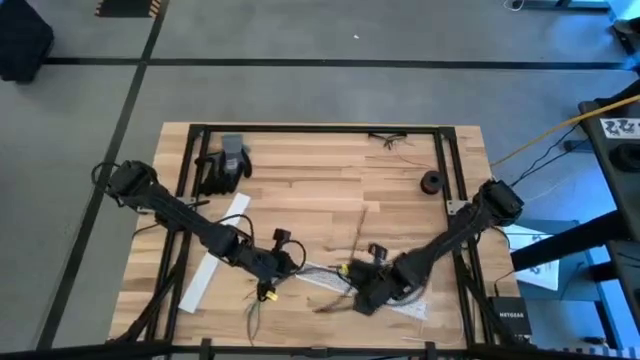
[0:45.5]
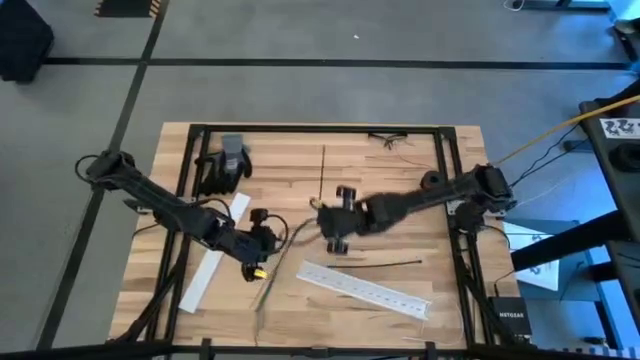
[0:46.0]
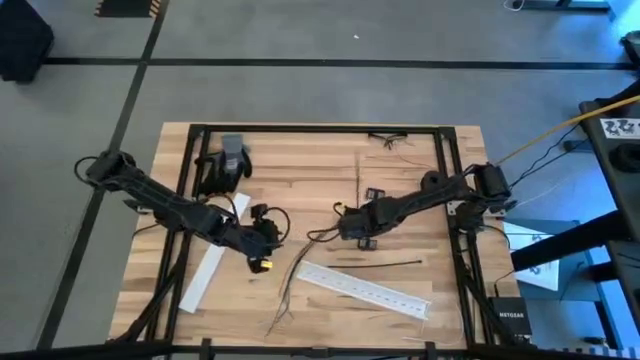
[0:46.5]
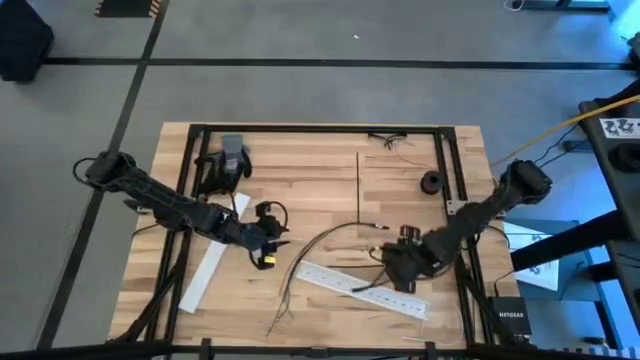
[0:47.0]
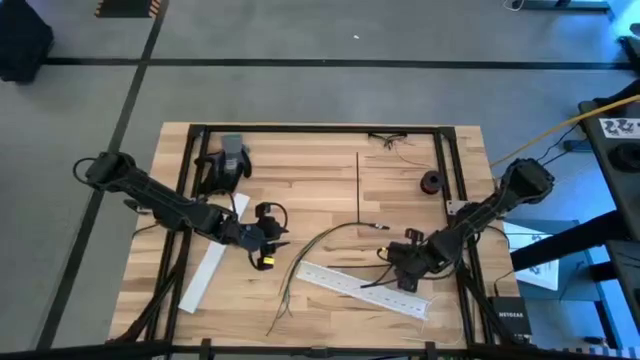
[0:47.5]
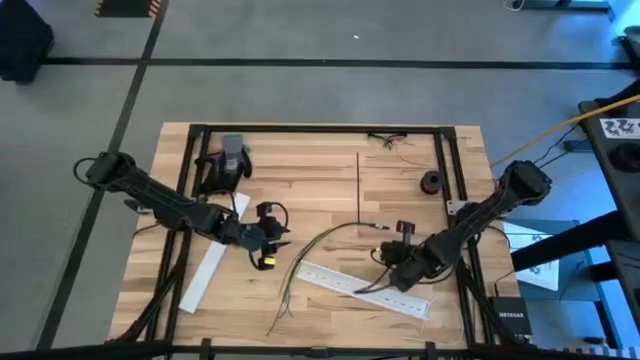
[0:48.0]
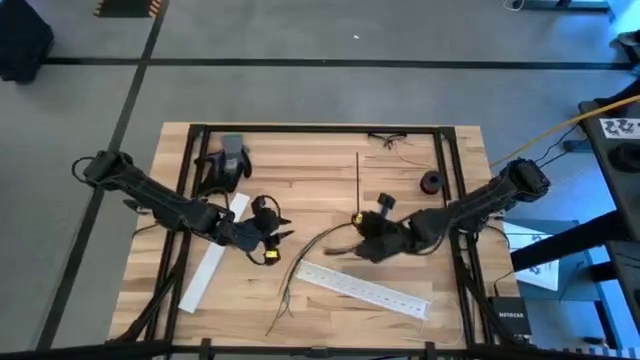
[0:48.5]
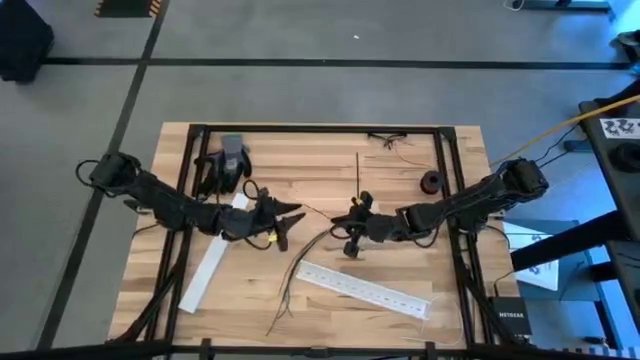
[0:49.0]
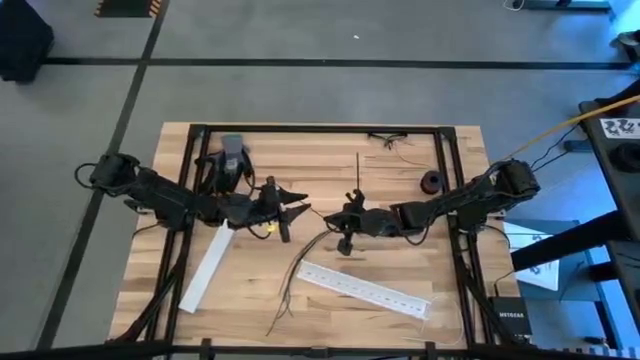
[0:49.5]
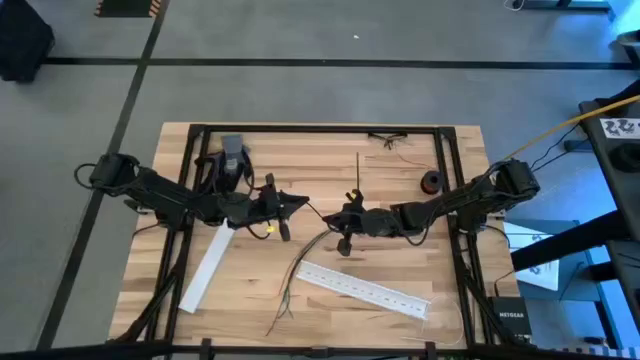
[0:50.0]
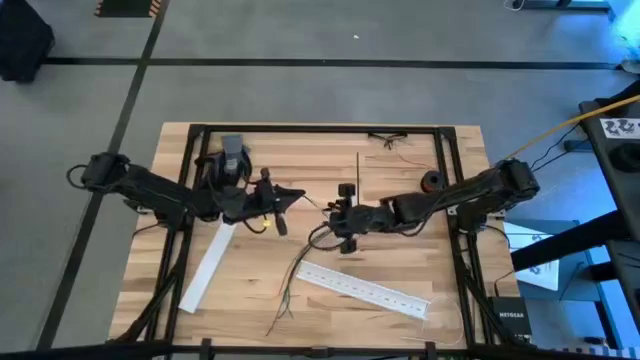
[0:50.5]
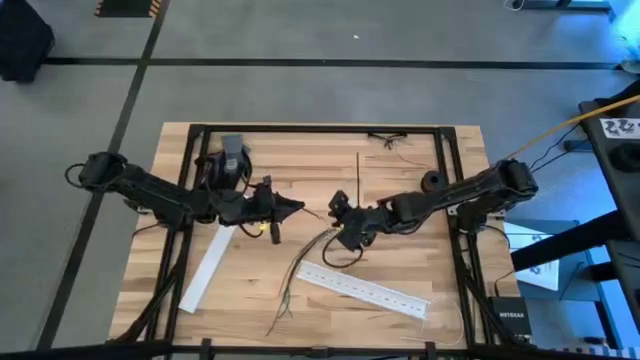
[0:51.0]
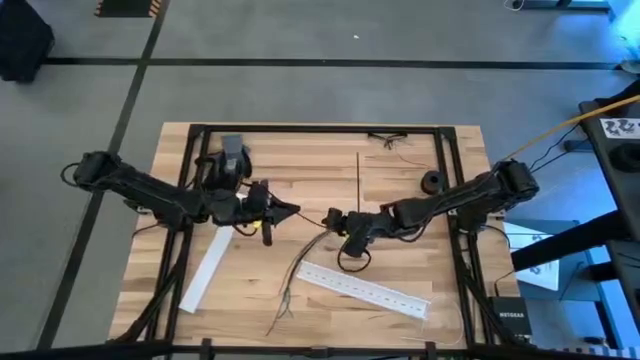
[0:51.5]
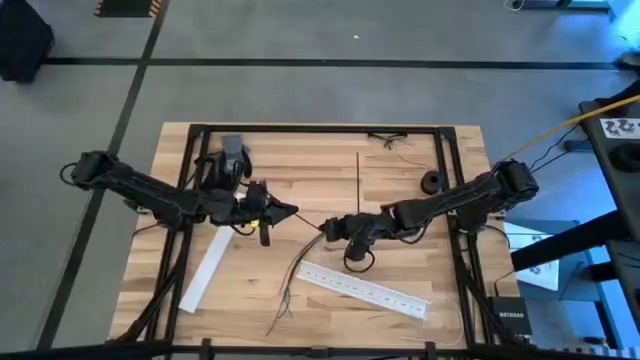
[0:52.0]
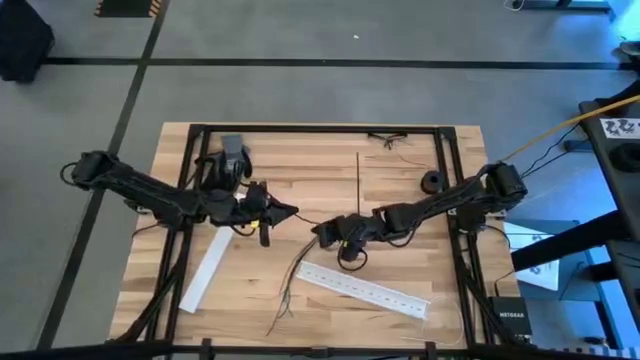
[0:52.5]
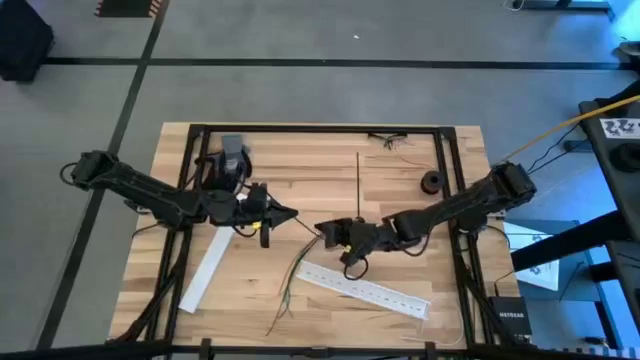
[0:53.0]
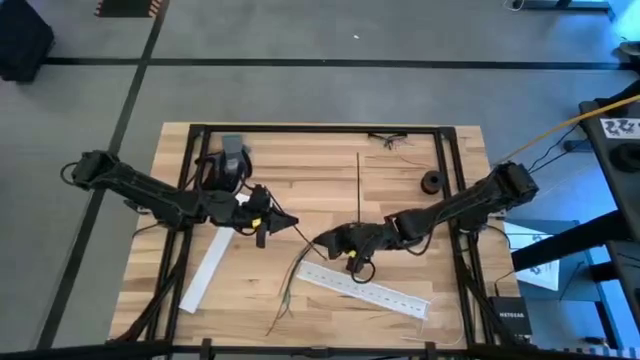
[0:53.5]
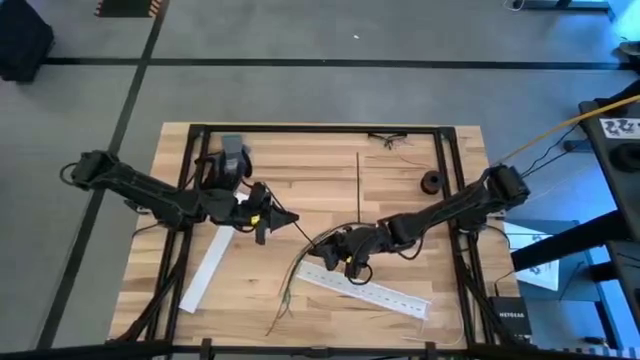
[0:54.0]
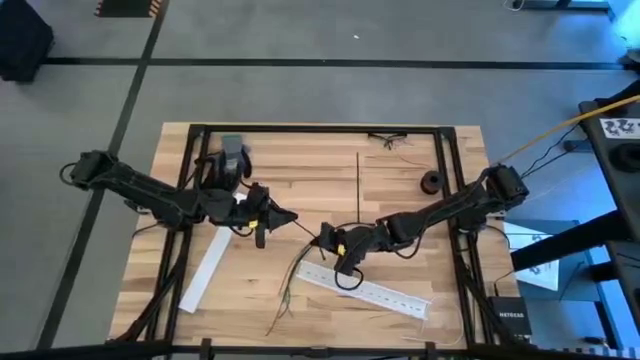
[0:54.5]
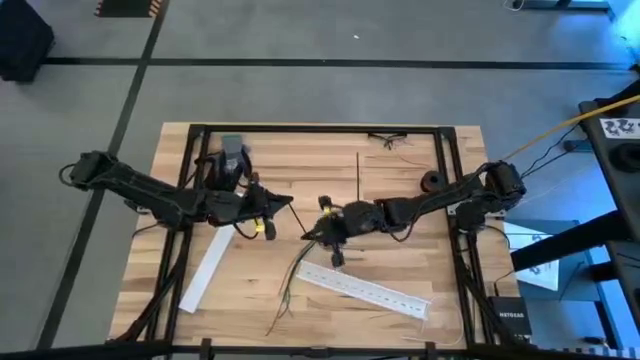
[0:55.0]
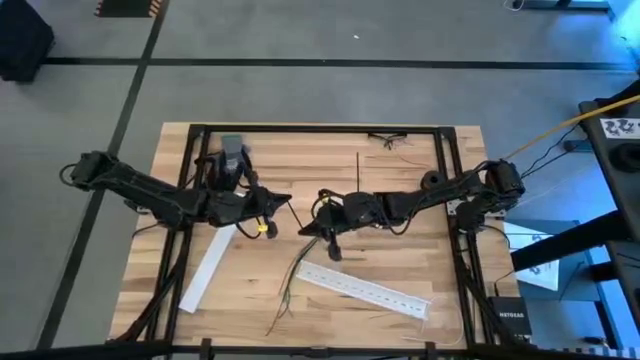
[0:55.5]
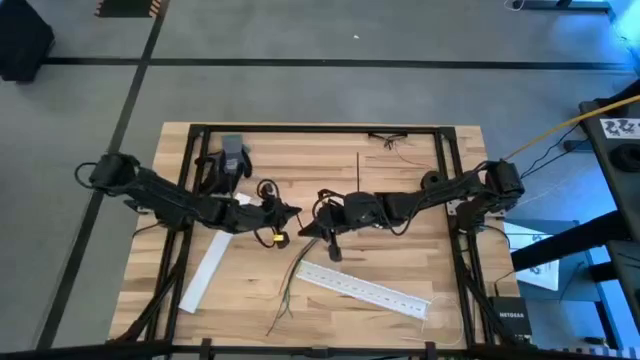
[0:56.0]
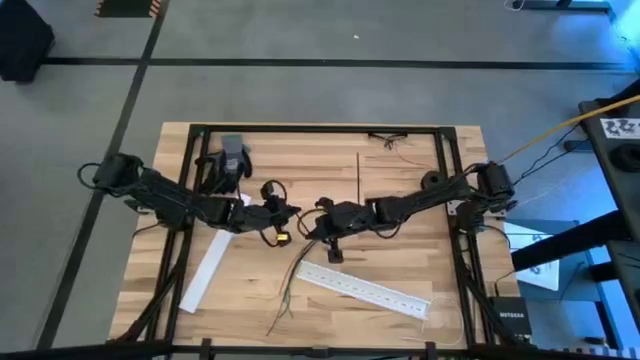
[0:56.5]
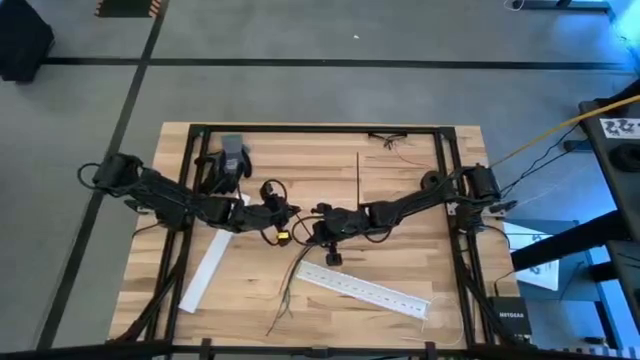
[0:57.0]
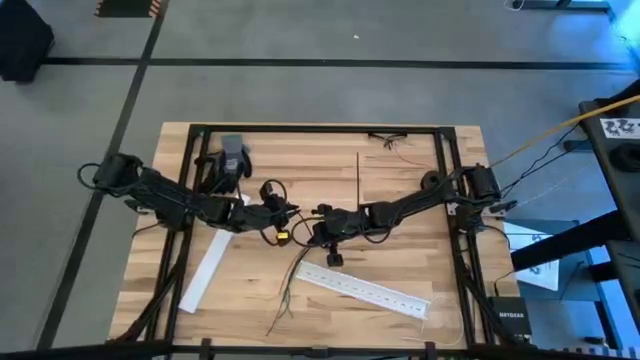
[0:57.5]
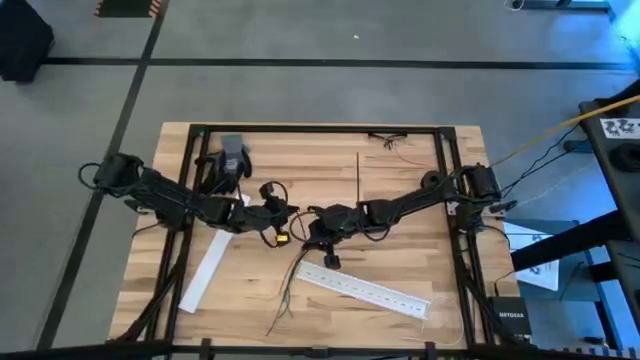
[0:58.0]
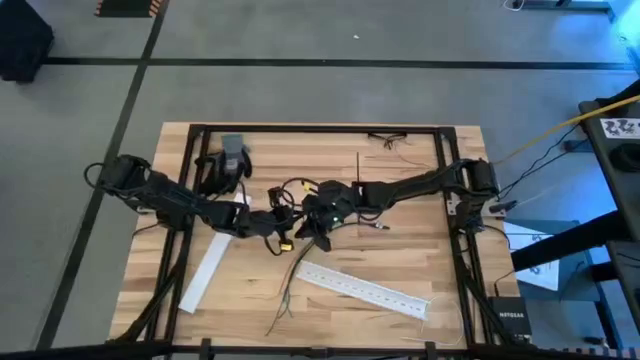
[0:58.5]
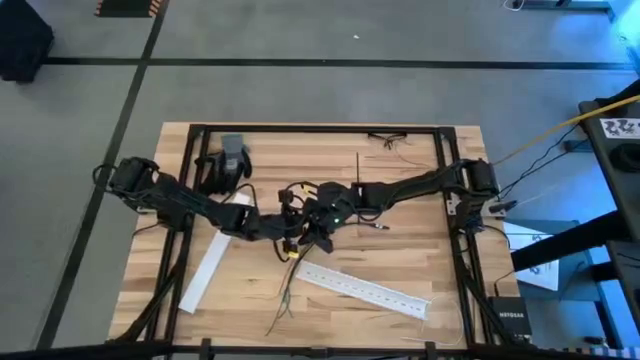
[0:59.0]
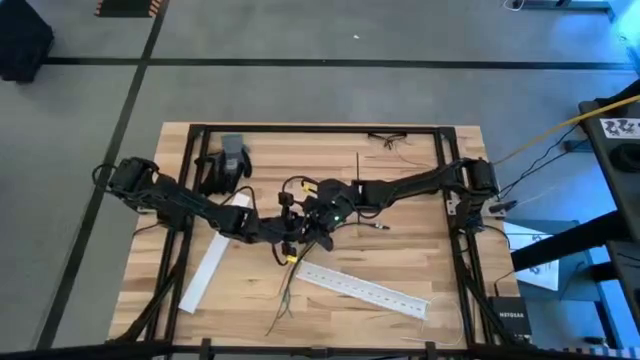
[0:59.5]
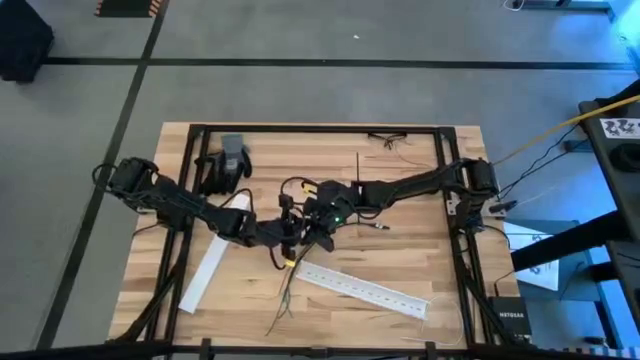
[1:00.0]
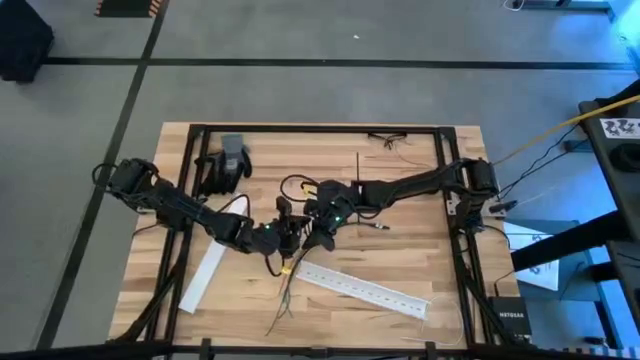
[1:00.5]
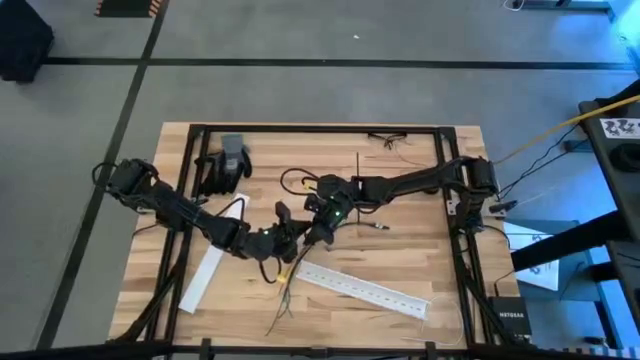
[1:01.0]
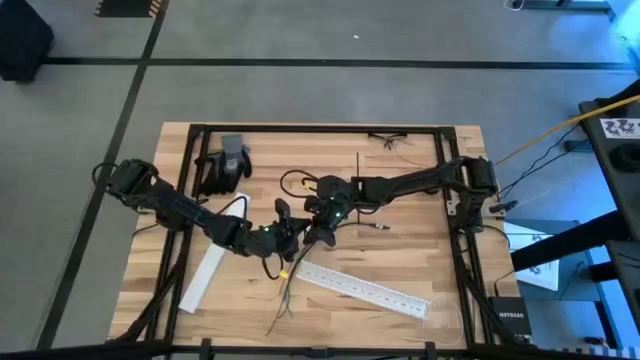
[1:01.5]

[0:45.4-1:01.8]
Task: Ziptie cables
Wrap the cables together using the top zip tie

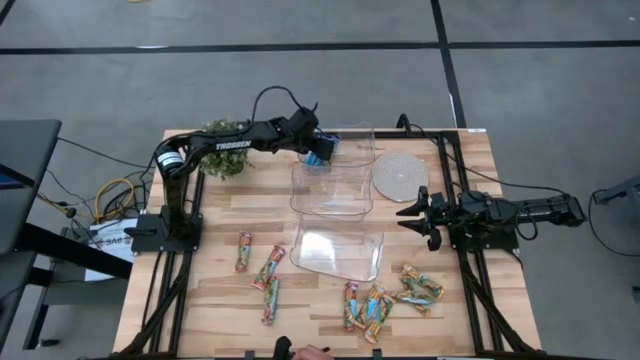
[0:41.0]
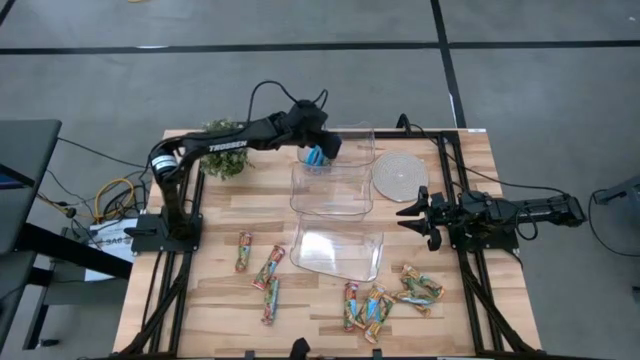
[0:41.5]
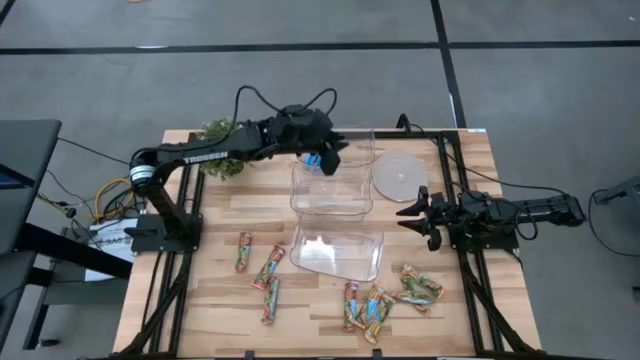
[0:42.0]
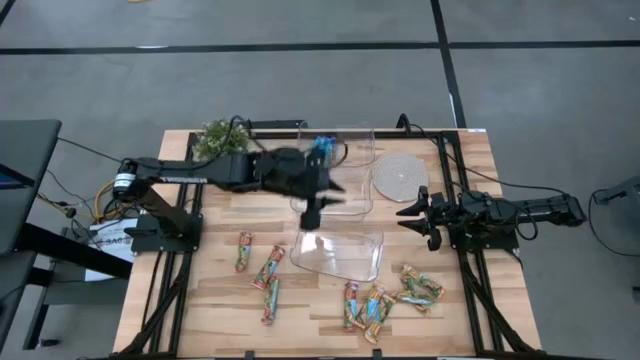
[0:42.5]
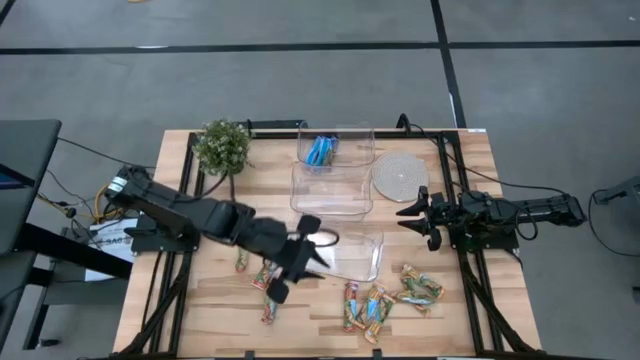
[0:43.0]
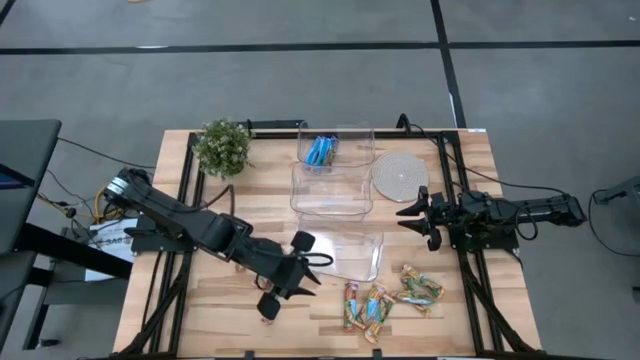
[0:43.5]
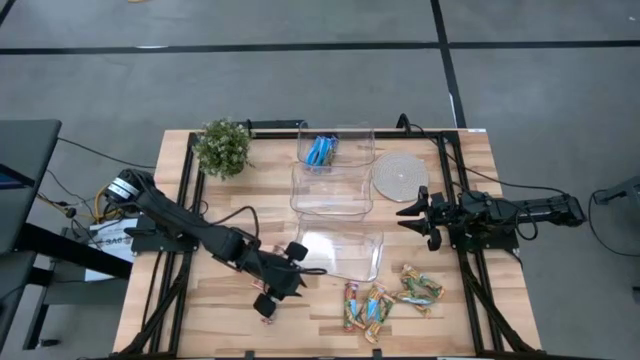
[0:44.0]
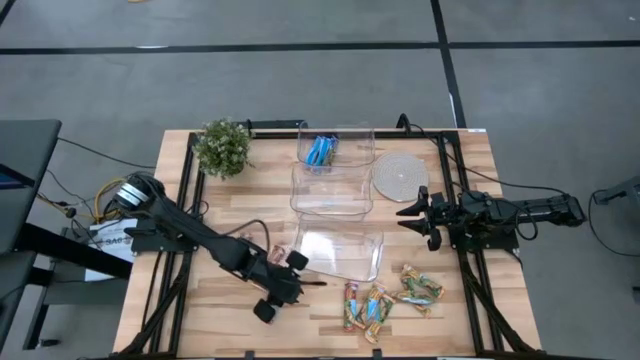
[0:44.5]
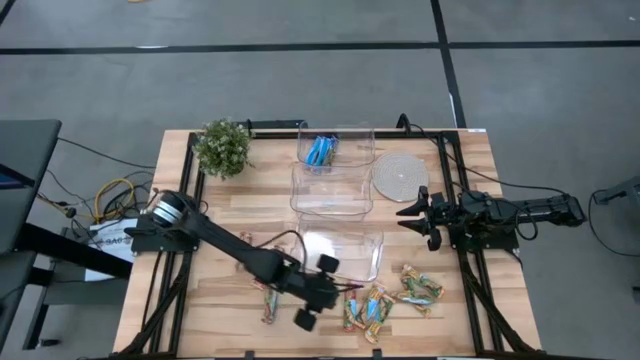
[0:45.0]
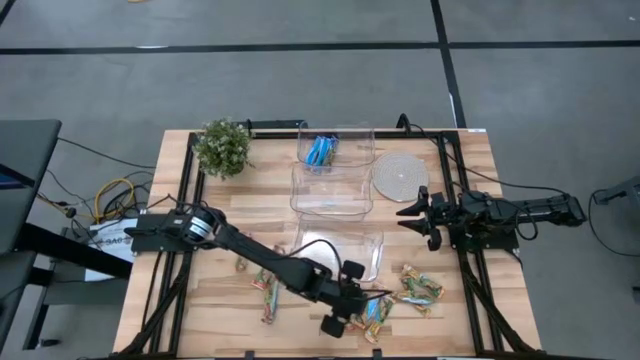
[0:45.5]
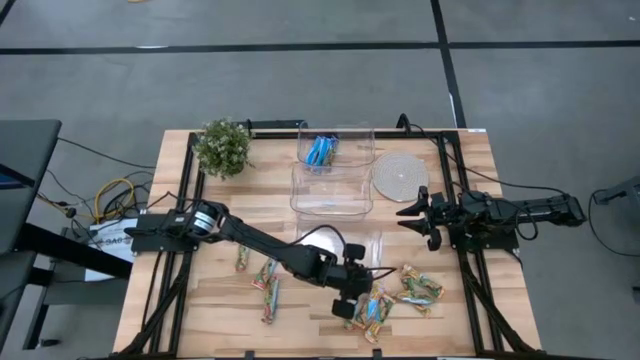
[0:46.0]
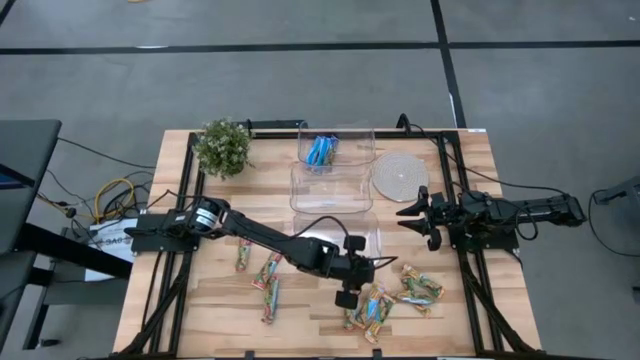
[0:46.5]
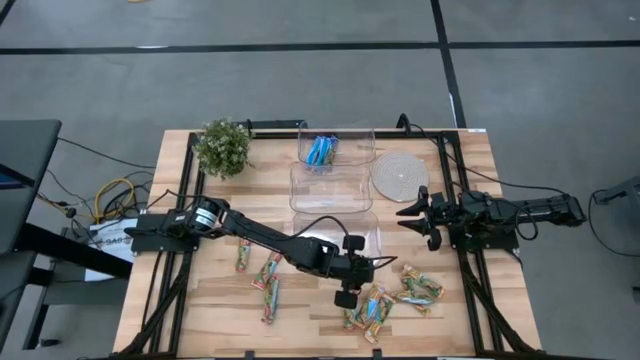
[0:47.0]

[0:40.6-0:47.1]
Task: Pick and place Granola Bars by type
Adjust the bottom transparent bin
